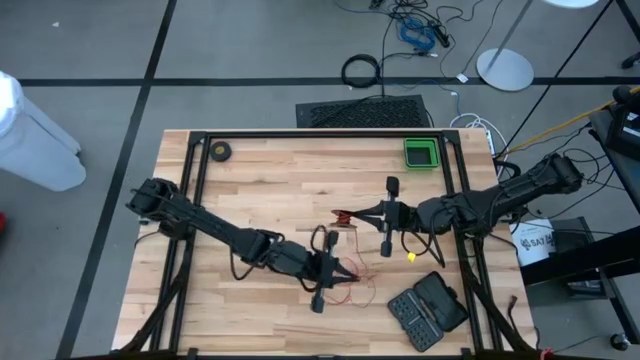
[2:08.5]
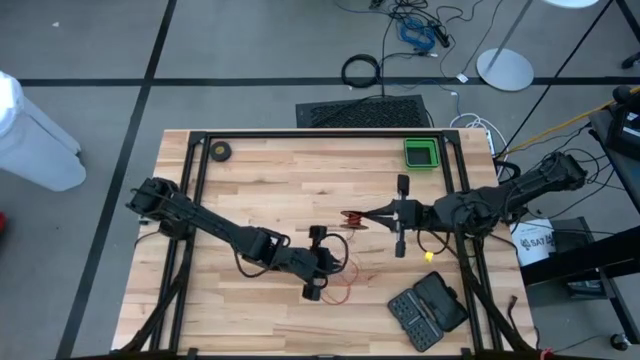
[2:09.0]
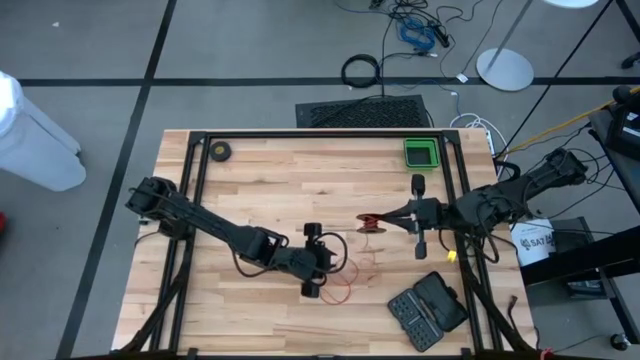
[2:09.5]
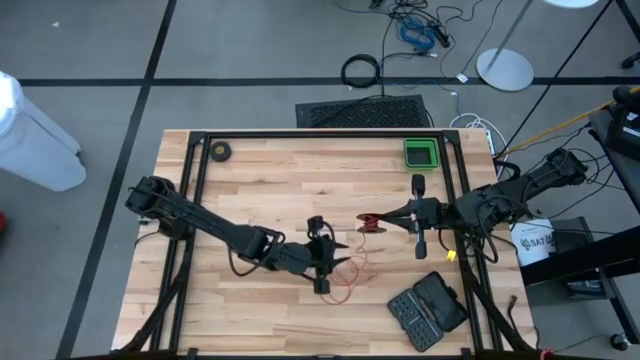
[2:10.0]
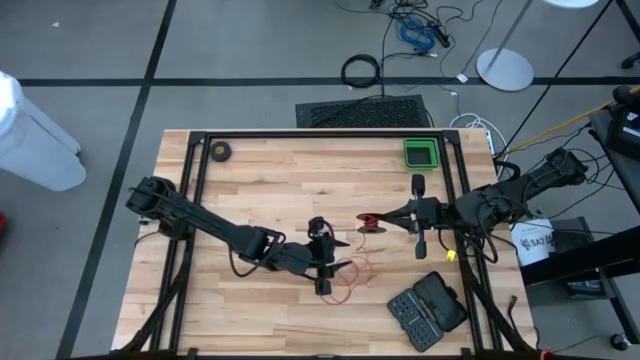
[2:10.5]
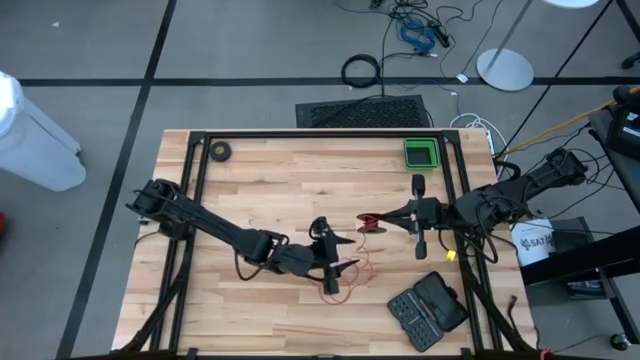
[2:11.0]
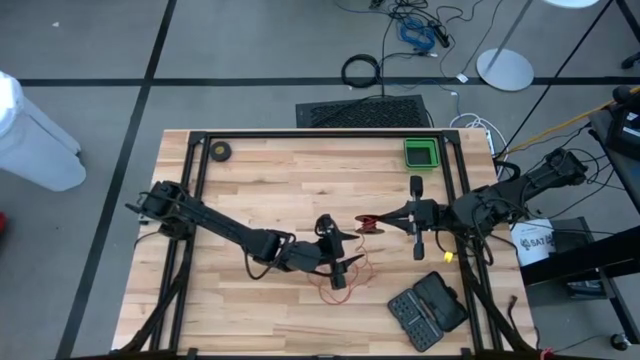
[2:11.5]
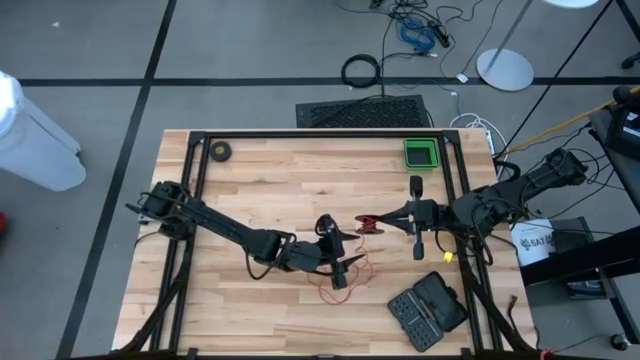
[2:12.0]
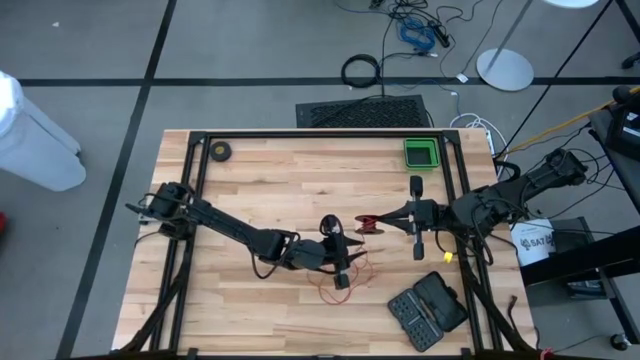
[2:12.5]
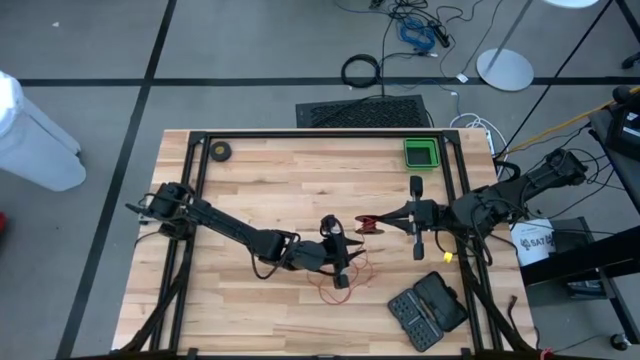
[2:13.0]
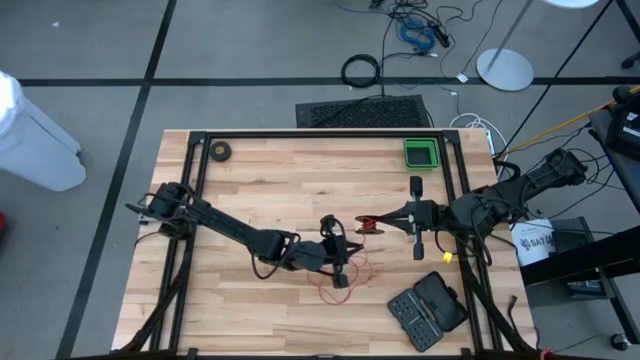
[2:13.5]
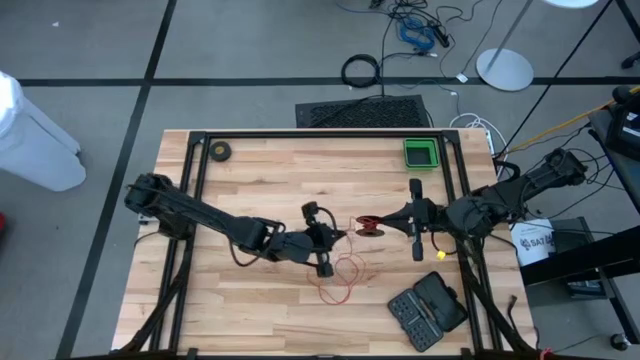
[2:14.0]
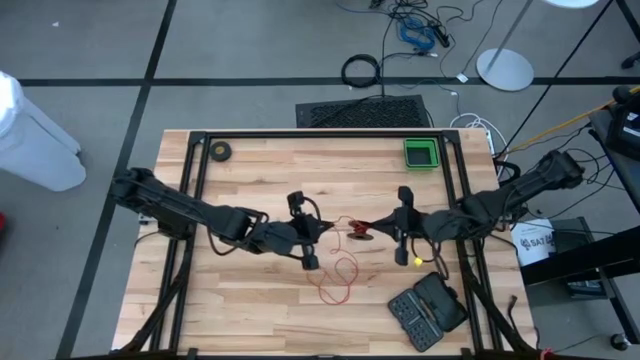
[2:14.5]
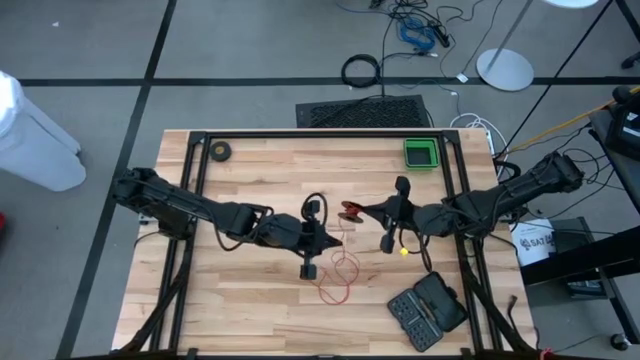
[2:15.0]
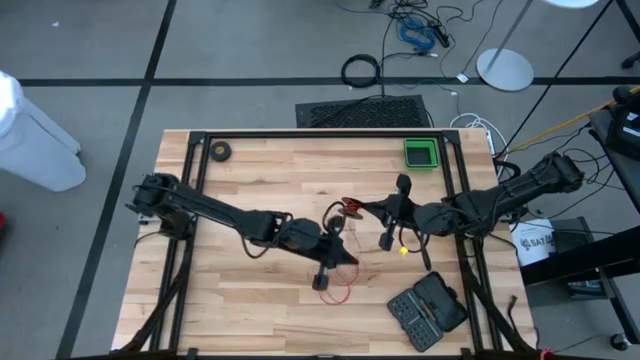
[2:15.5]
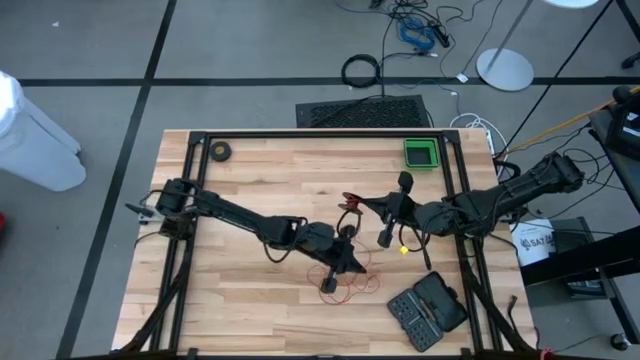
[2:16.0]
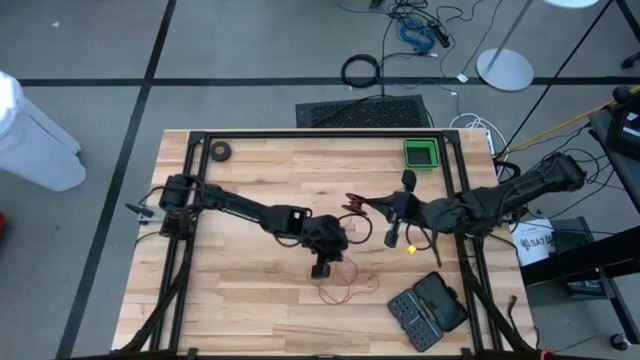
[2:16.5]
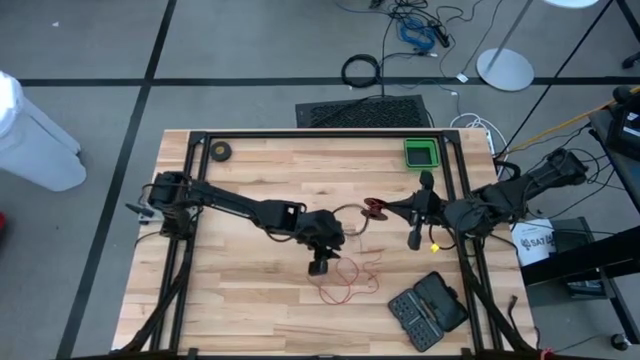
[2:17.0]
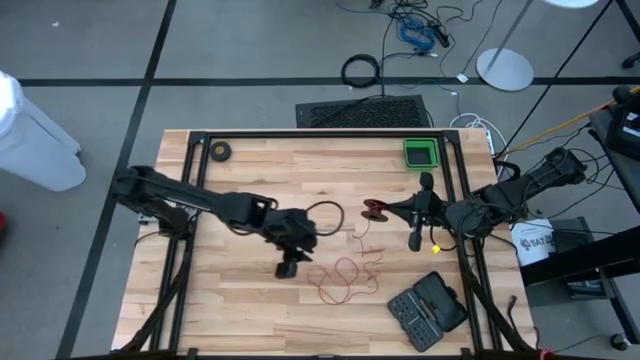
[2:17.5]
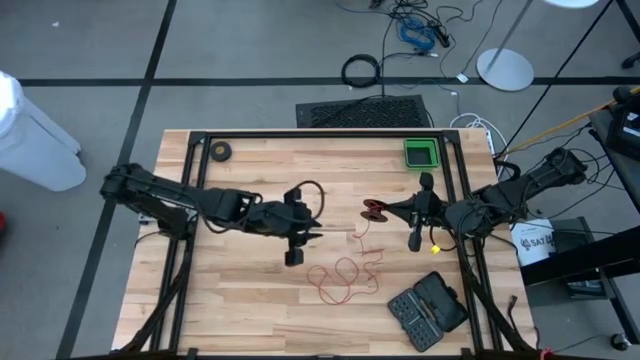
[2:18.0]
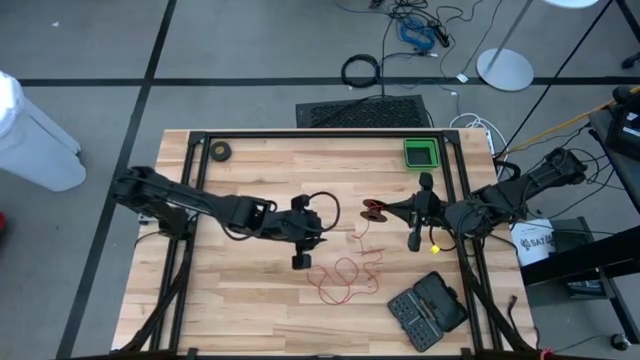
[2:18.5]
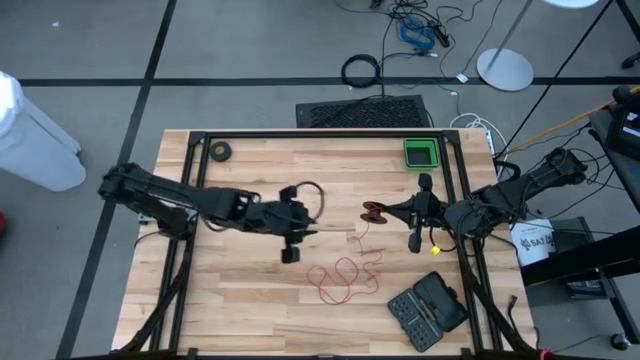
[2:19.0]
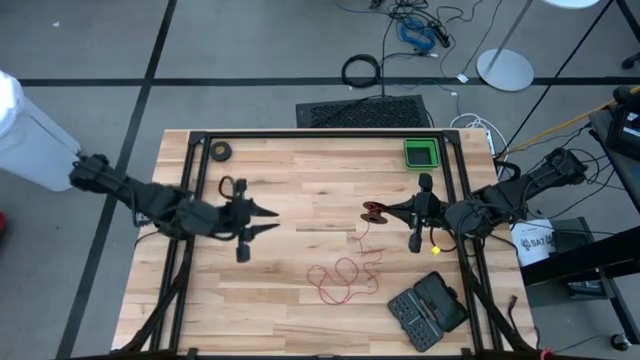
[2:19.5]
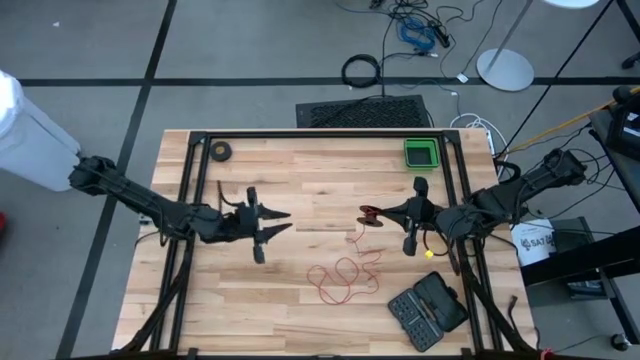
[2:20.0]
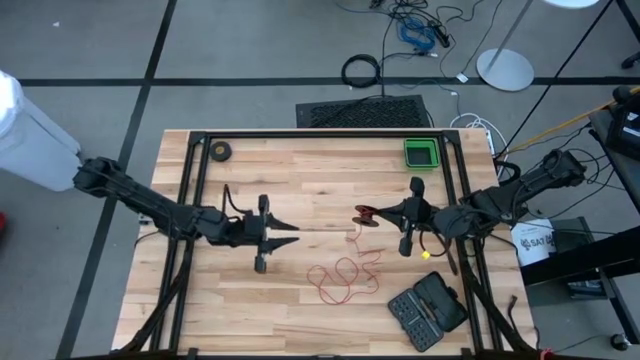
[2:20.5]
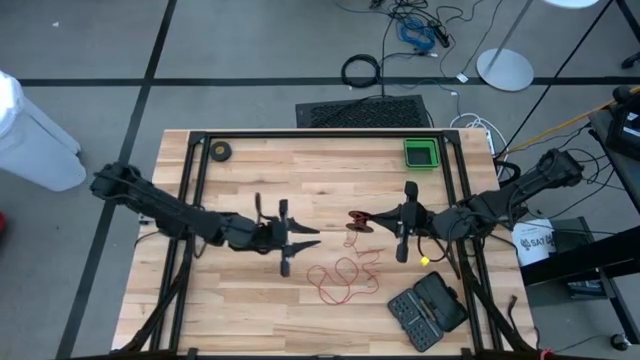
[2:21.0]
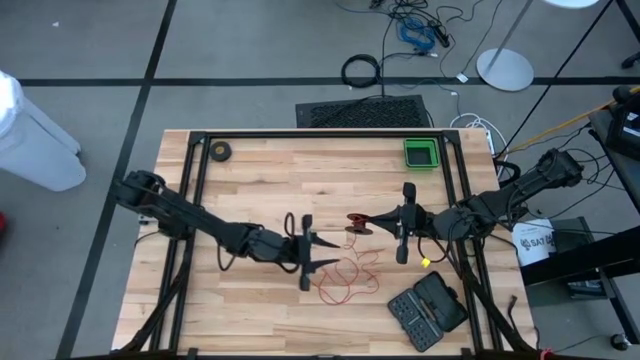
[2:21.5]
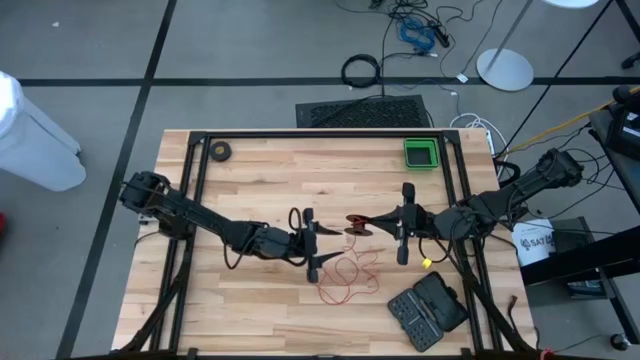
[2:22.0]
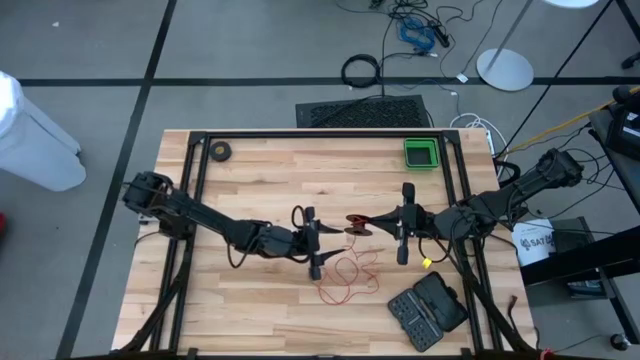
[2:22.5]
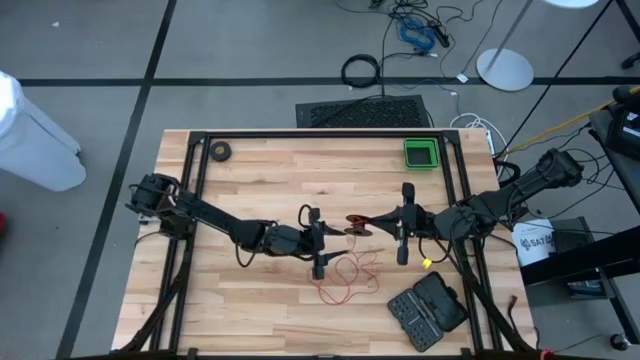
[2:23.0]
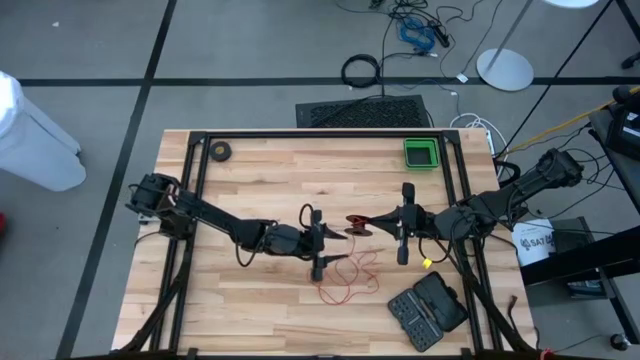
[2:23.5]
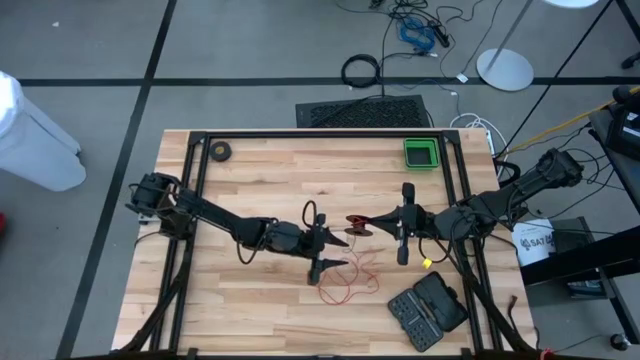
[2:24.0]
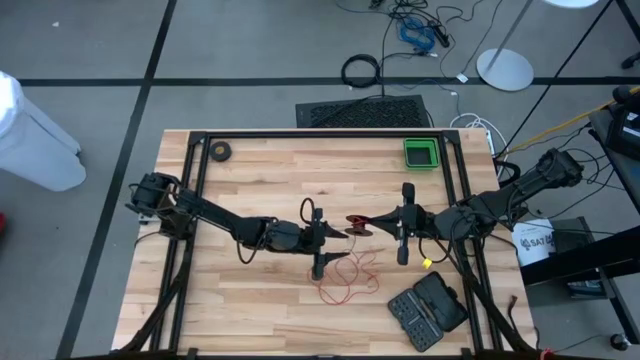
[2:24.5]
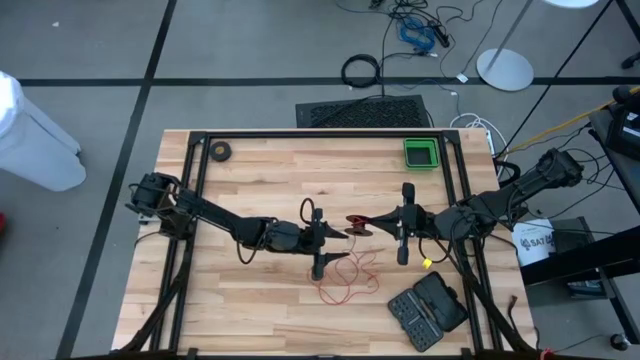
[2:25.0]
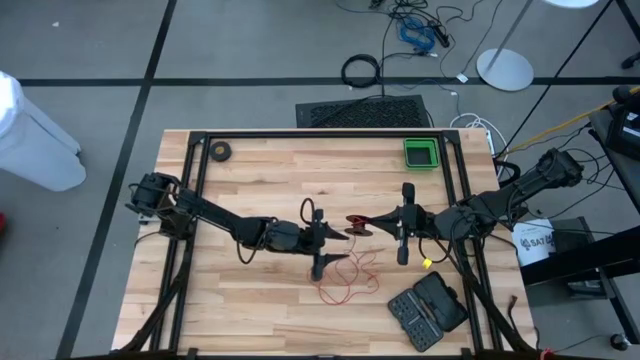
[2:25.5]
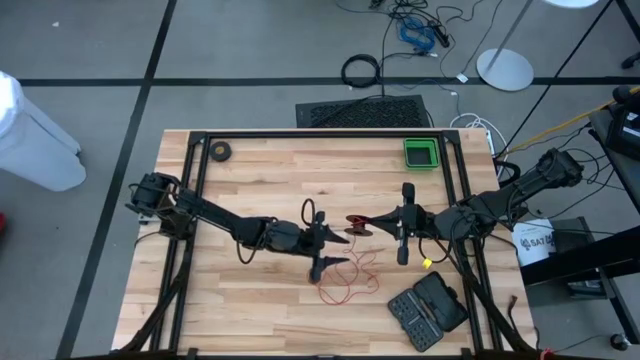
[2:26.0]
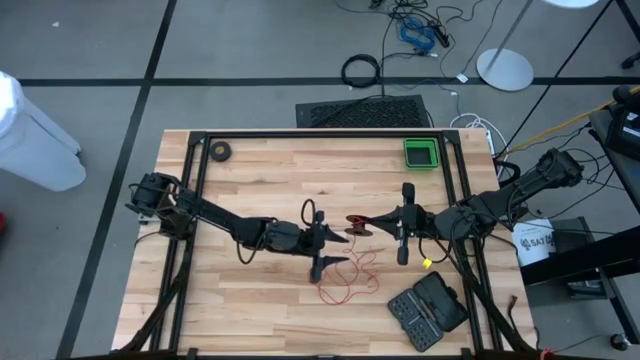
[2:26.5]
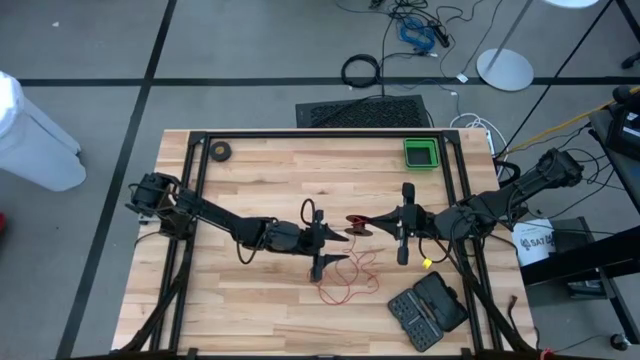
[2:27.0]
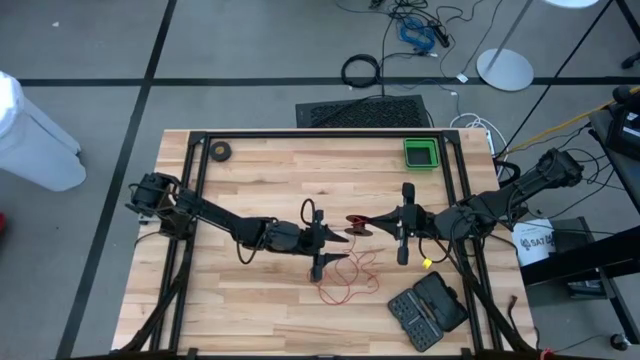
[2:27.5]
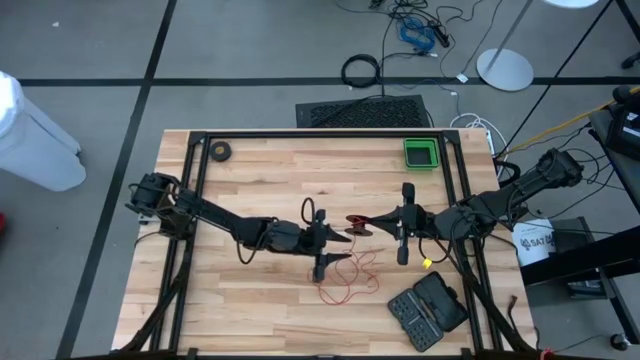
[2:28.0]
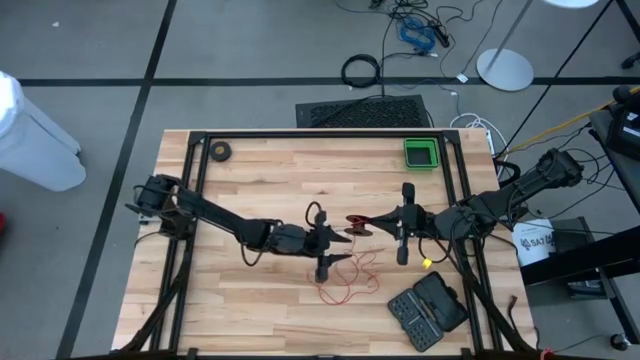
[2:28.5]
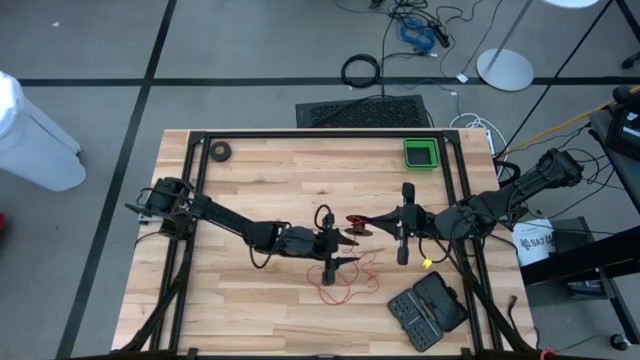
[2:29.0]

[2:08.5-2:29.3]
Task: Coil cords
Uncoil the red wire from the spool
